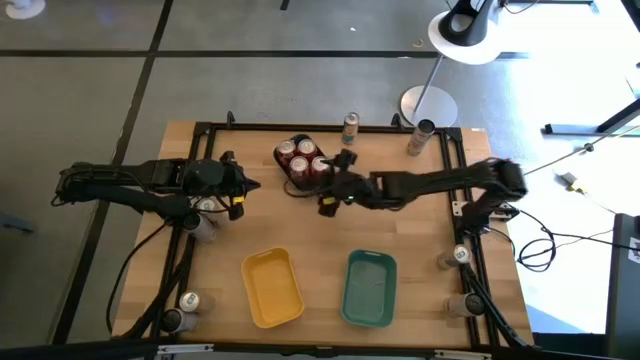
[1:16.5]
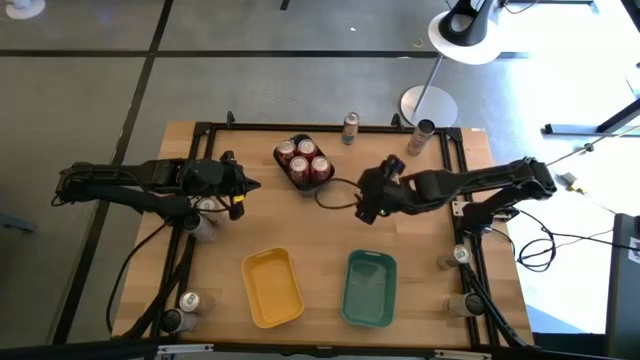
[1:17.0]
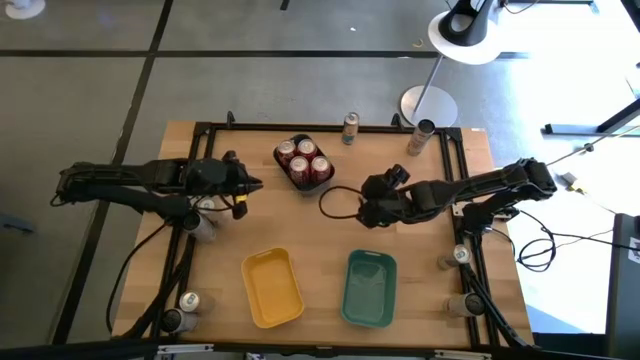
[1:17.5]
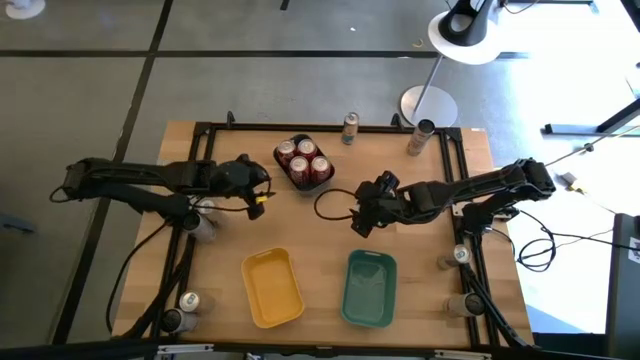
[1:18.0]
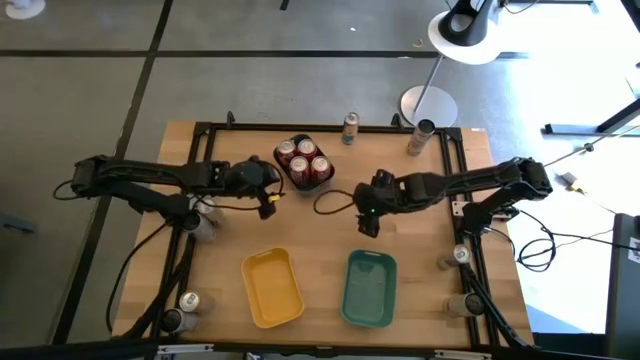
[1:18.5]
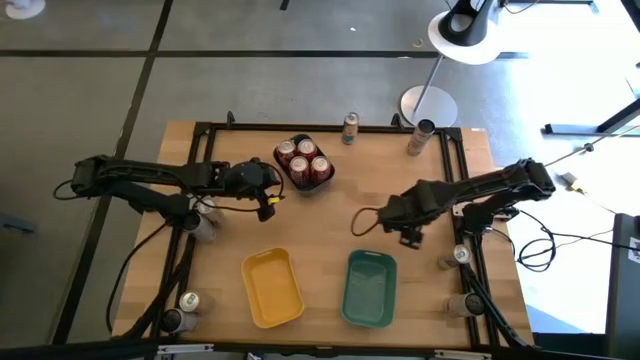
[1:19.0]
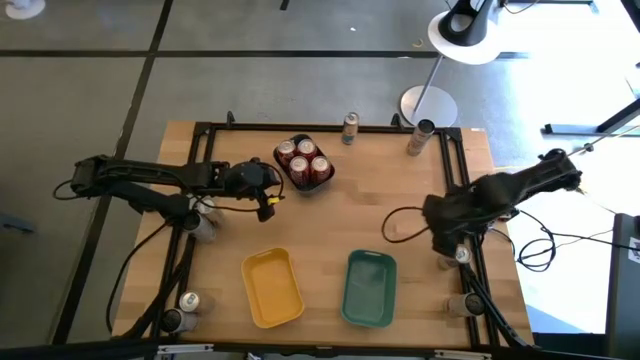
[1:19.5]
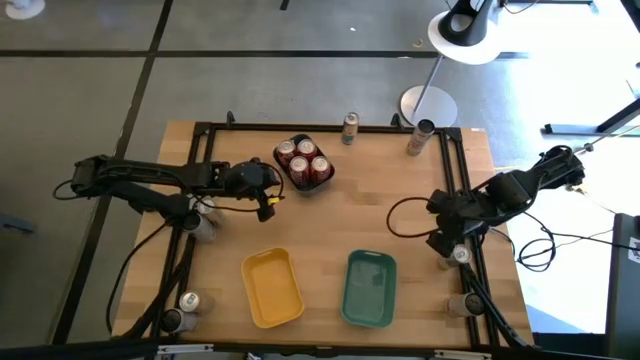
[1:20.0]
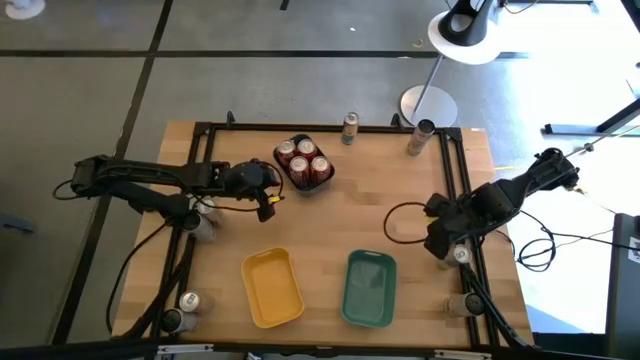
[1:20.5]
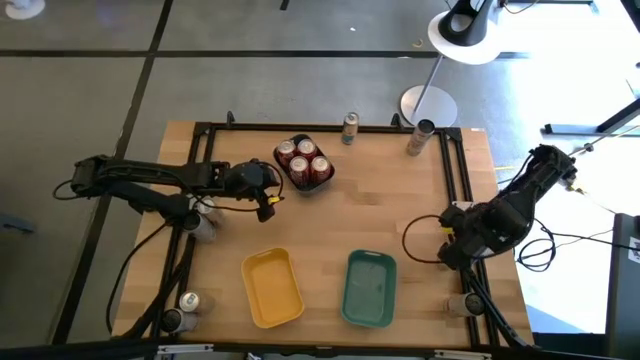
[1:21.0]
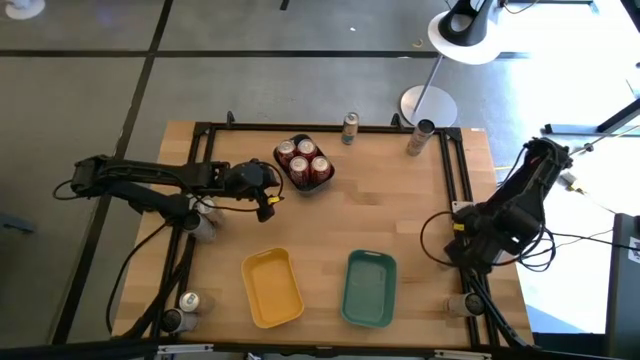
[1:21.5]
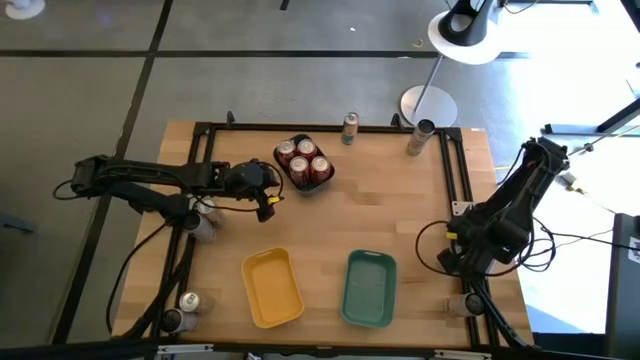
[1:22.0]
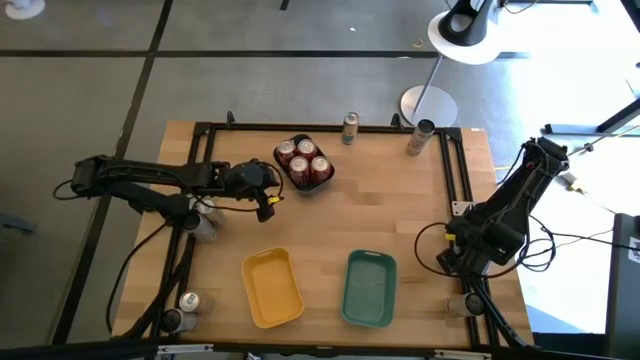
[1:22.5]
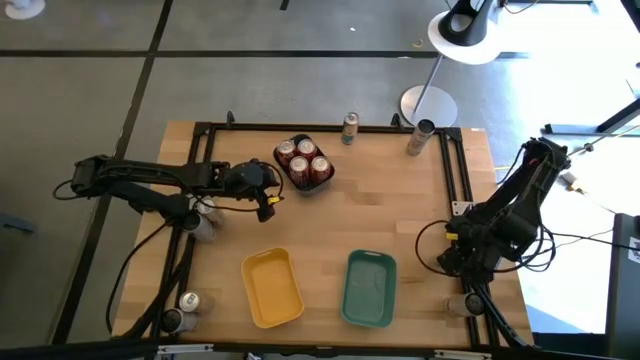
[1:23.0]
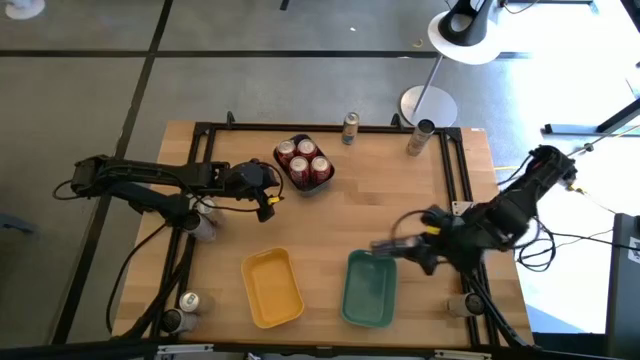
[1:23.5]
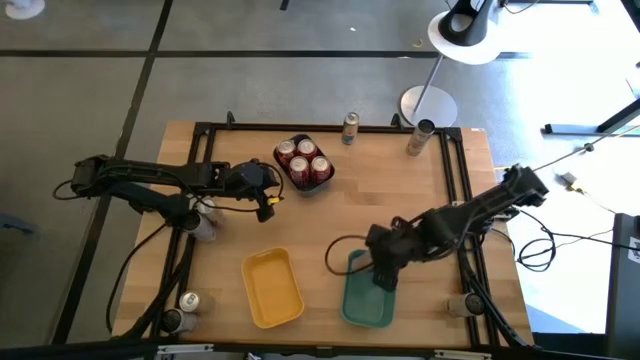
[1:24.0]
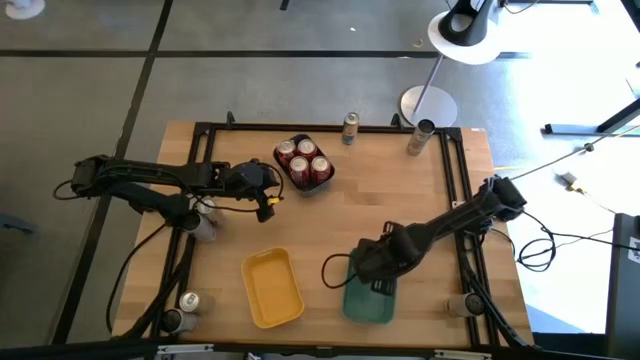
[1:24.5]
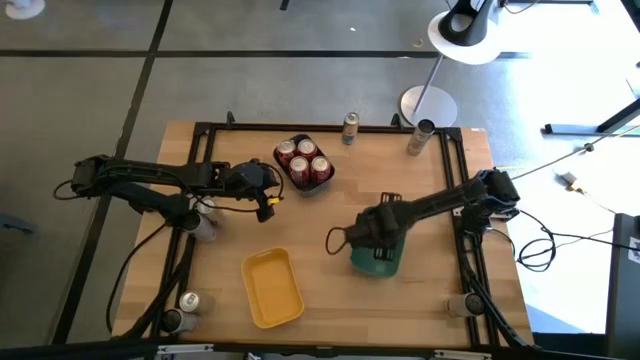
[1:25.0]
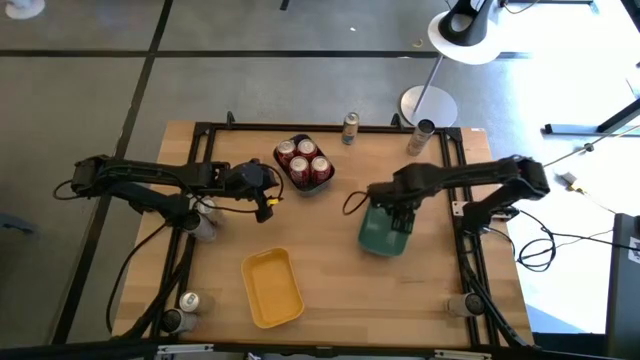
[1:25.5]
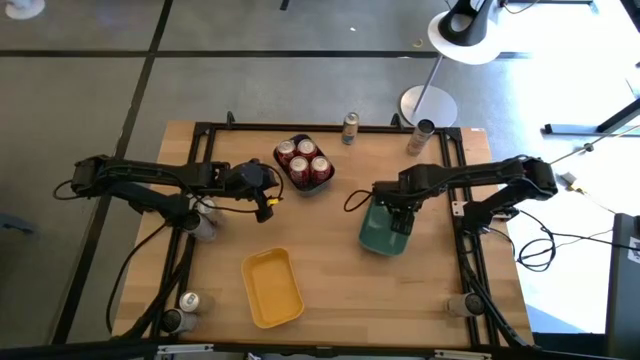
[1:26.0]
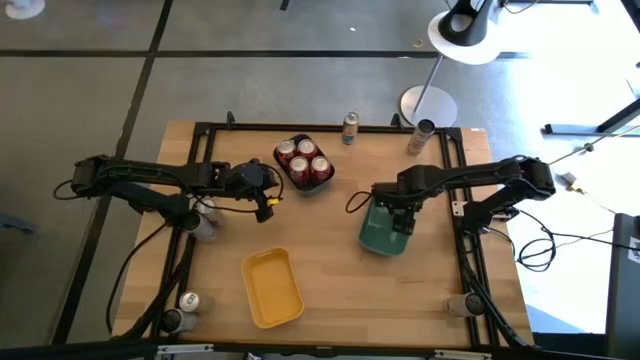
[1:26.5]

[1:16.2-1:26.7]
Task: Sort soda cans
Put the blue soda can into the green bin

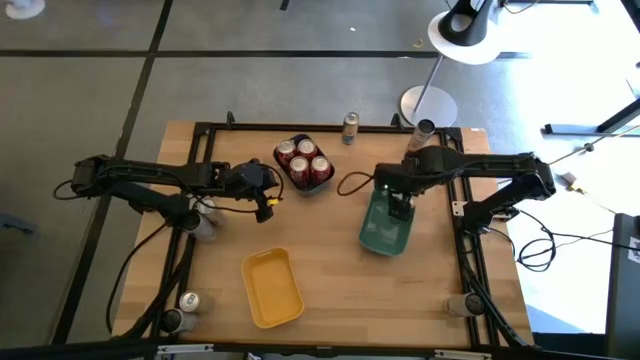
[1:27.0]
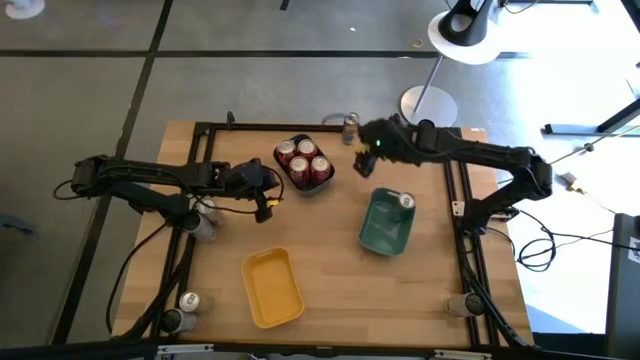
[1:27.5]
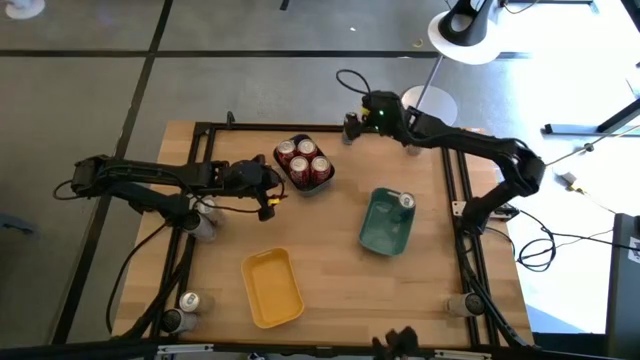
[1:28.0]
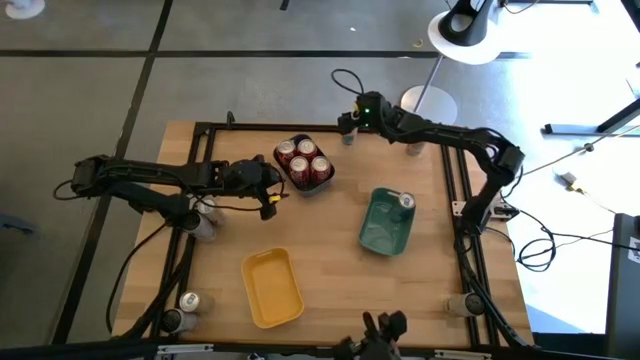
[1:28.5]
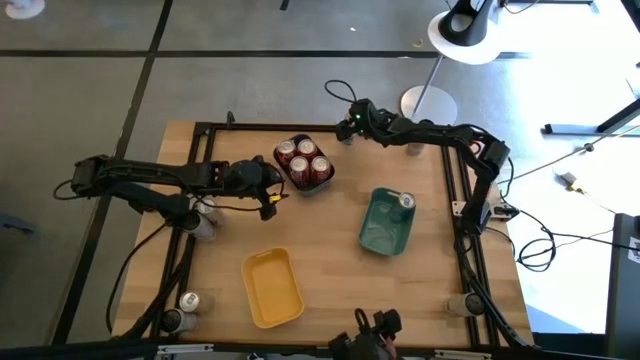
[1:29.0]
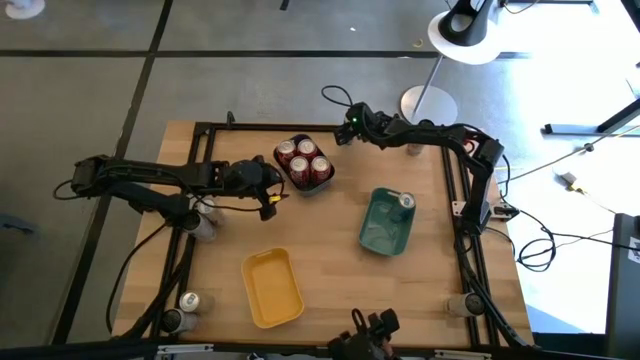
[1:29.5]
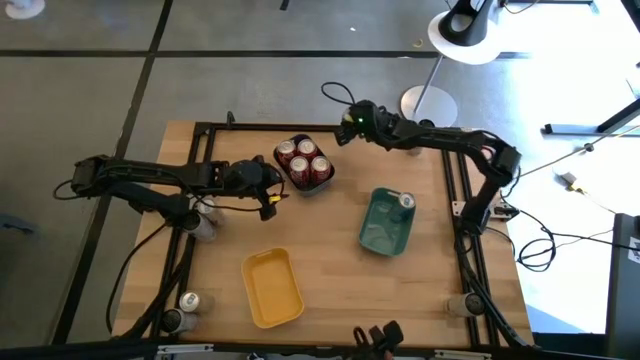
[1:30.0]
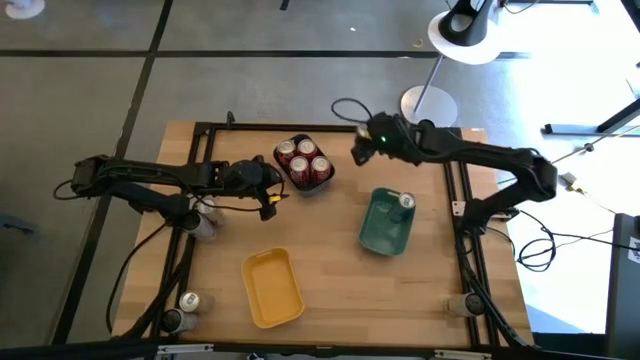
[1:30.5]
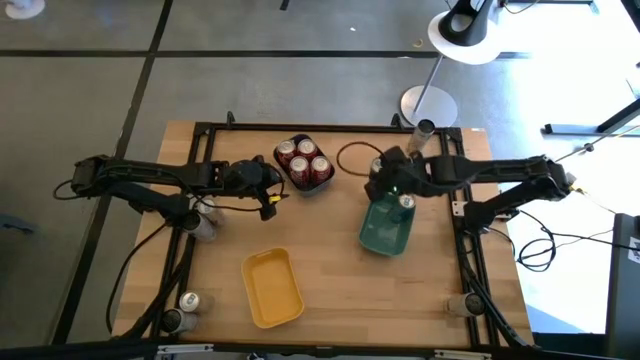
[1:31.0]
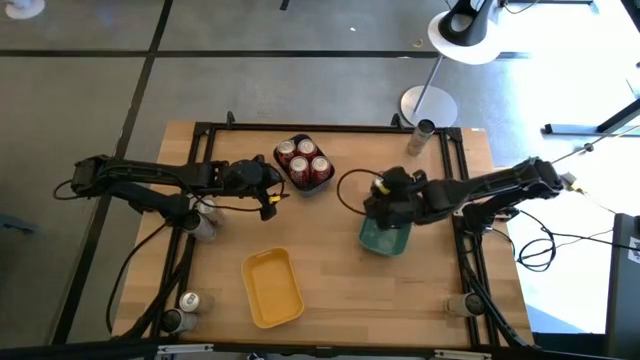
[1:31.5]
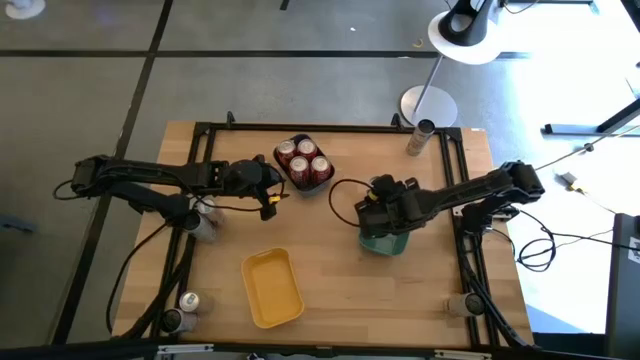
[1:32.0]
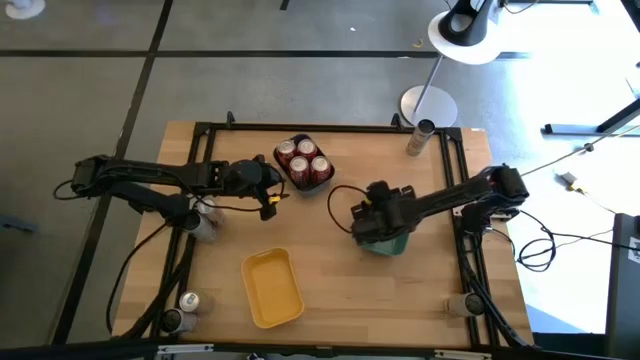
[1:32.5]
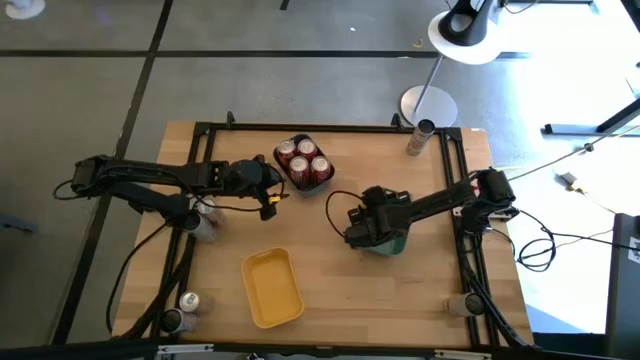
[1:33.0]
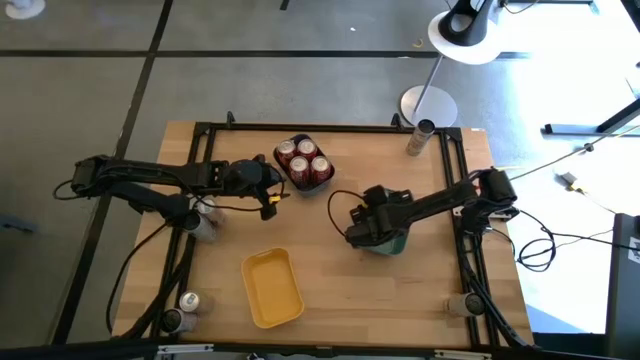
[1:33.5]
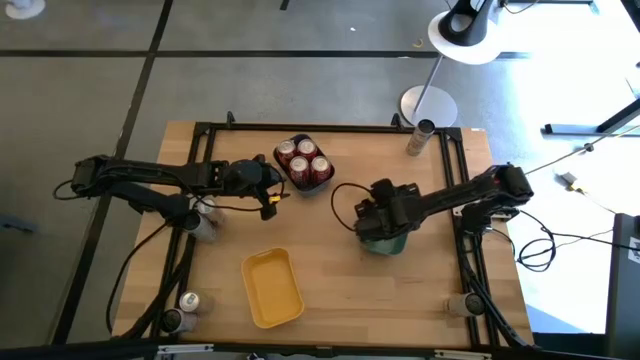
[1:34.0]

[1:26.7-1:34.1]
Put the blue soda can into the green bin
